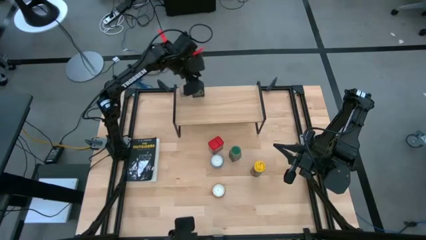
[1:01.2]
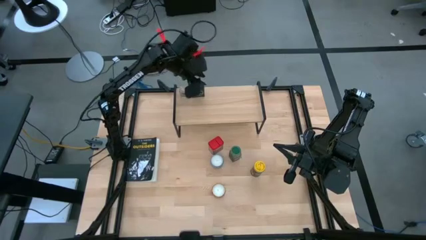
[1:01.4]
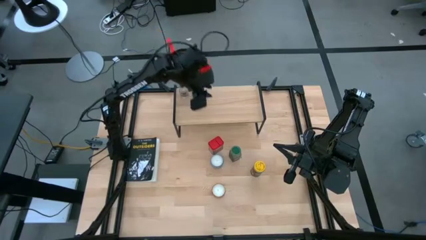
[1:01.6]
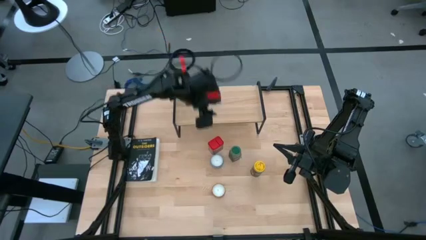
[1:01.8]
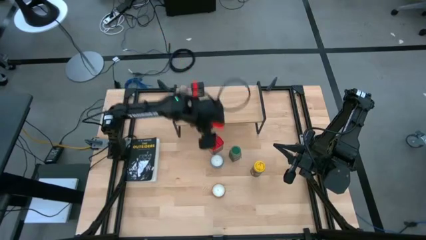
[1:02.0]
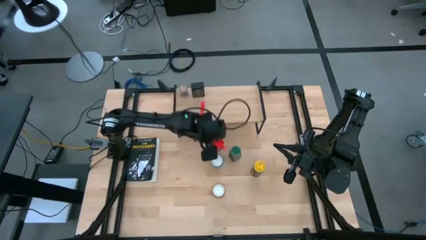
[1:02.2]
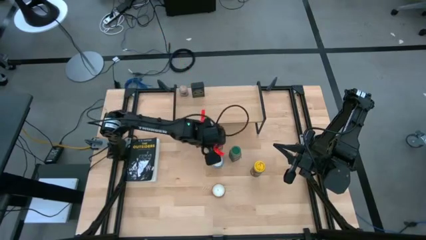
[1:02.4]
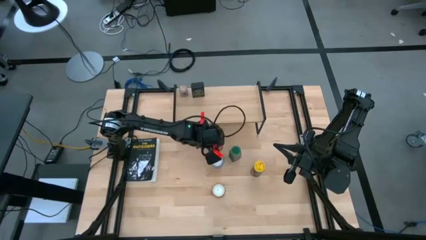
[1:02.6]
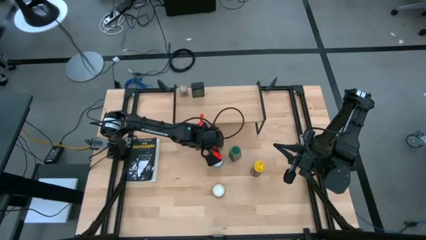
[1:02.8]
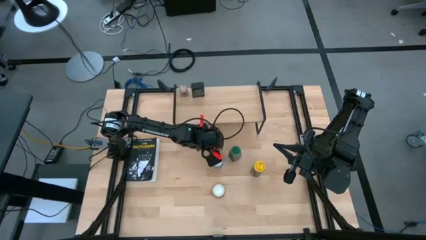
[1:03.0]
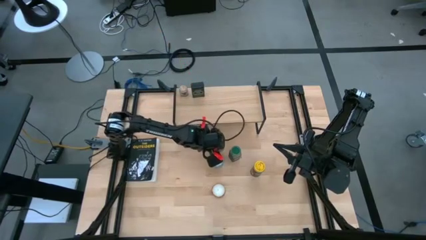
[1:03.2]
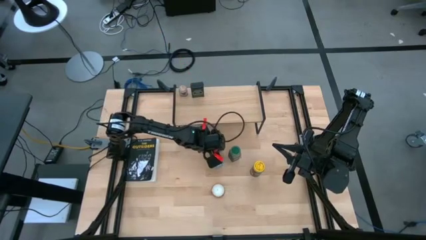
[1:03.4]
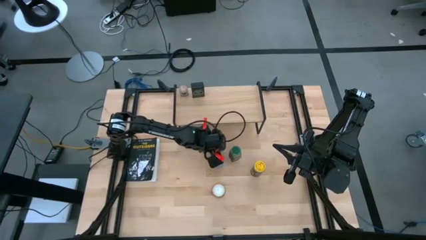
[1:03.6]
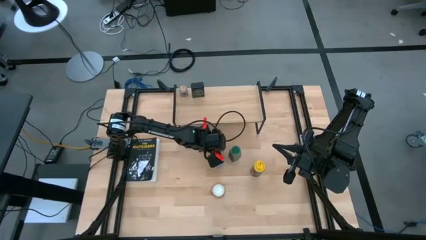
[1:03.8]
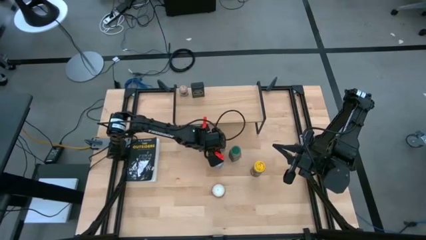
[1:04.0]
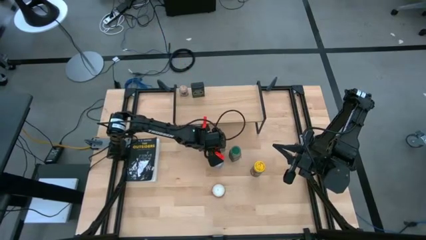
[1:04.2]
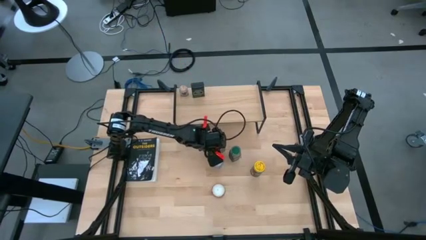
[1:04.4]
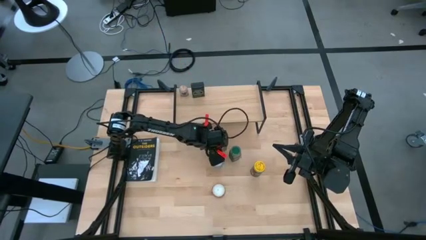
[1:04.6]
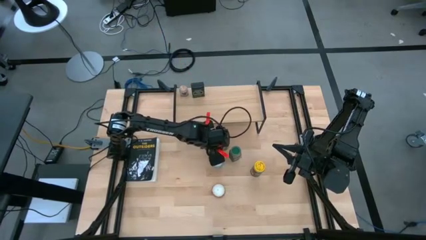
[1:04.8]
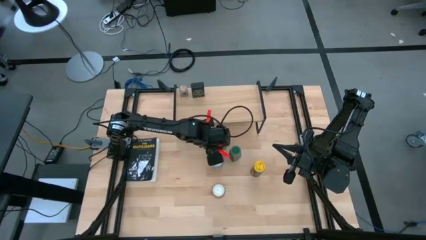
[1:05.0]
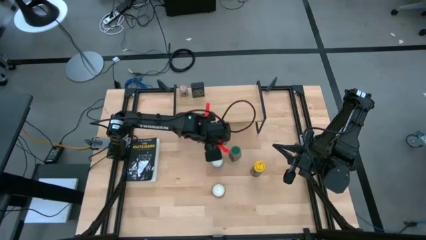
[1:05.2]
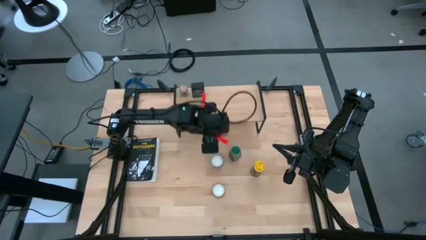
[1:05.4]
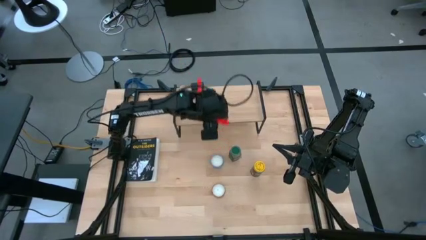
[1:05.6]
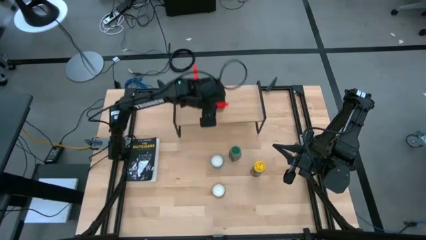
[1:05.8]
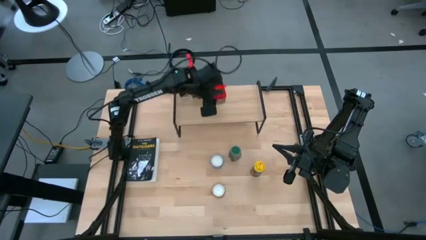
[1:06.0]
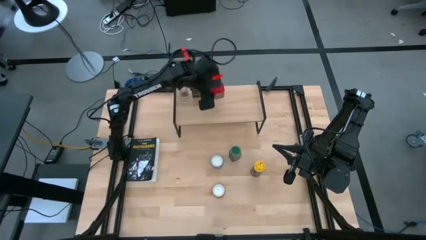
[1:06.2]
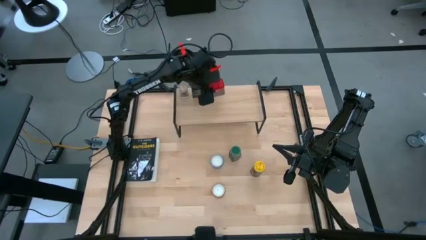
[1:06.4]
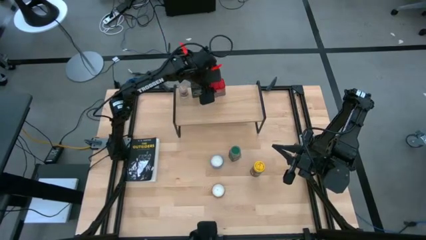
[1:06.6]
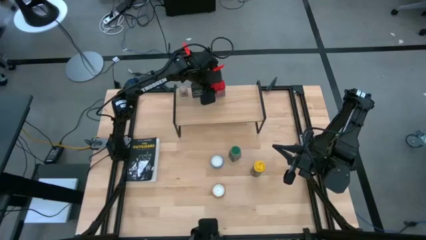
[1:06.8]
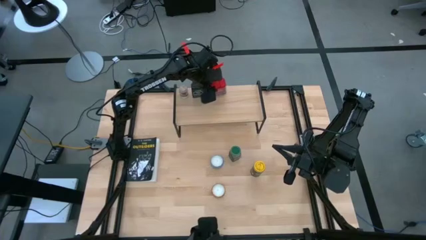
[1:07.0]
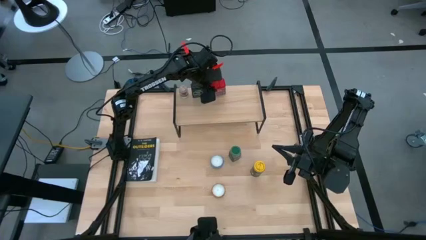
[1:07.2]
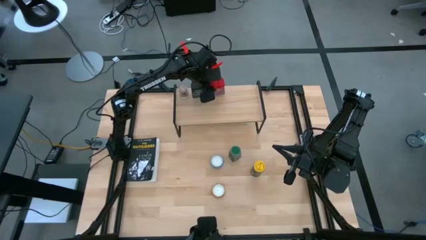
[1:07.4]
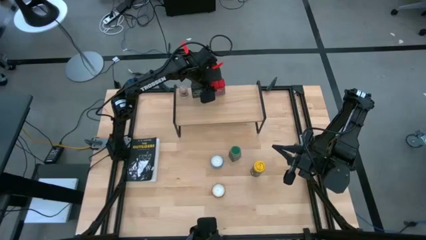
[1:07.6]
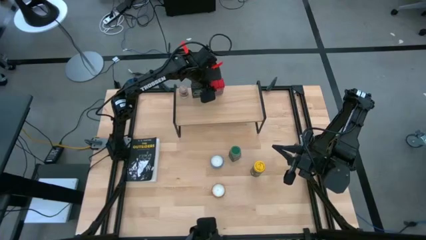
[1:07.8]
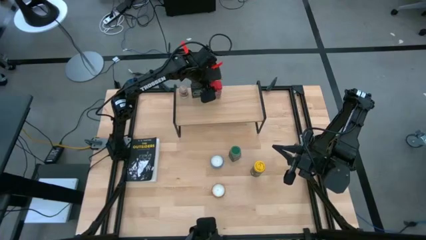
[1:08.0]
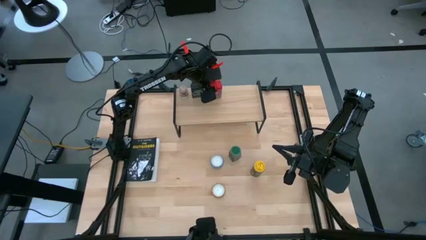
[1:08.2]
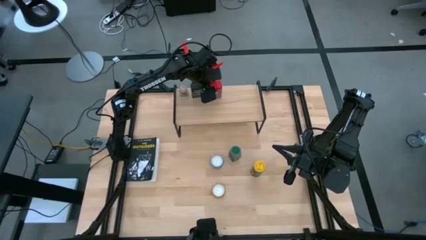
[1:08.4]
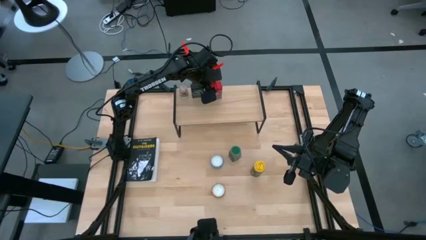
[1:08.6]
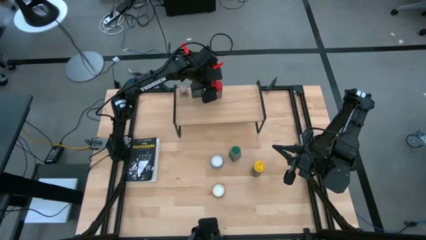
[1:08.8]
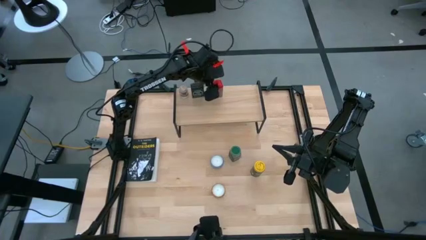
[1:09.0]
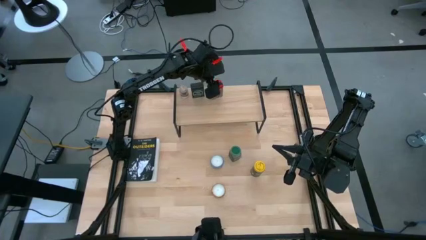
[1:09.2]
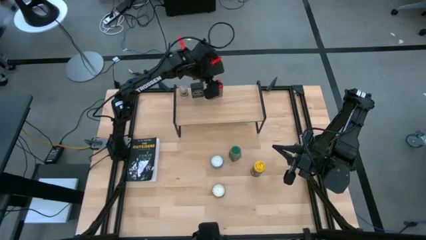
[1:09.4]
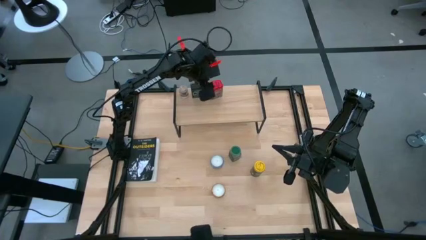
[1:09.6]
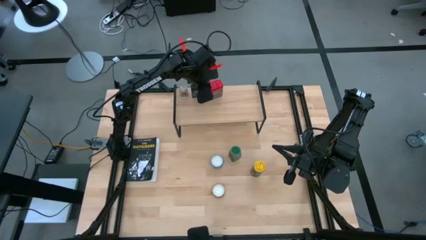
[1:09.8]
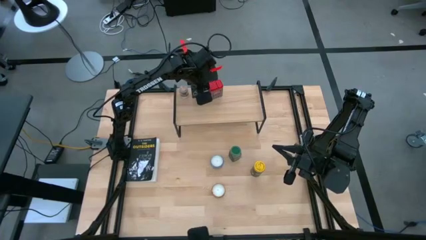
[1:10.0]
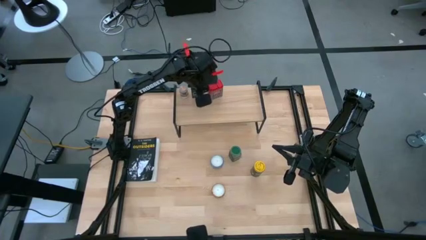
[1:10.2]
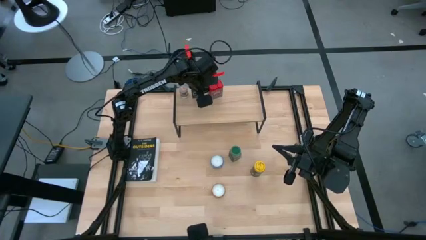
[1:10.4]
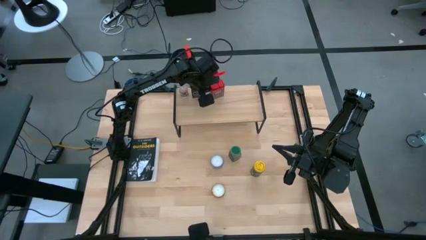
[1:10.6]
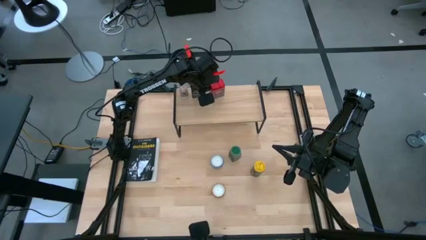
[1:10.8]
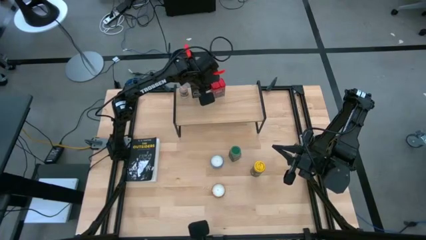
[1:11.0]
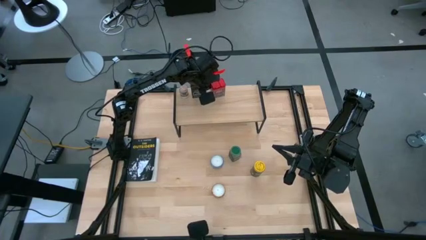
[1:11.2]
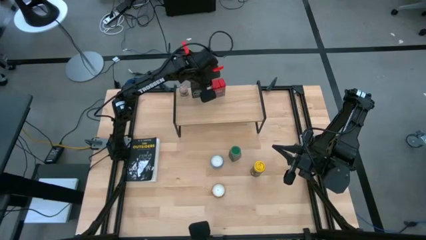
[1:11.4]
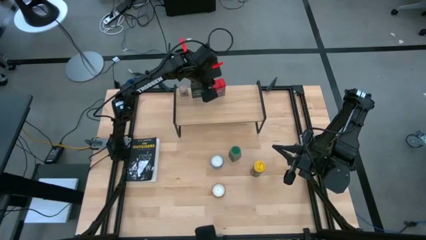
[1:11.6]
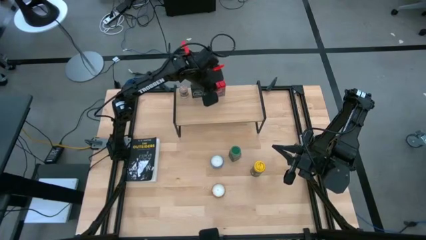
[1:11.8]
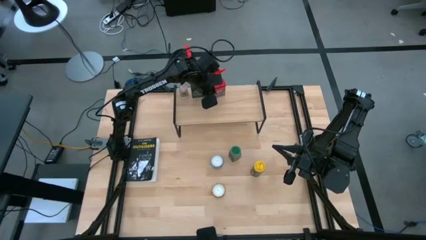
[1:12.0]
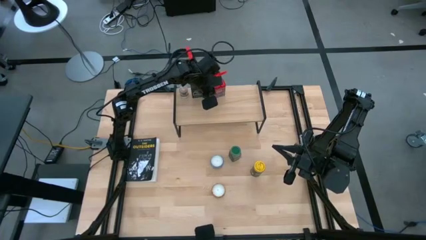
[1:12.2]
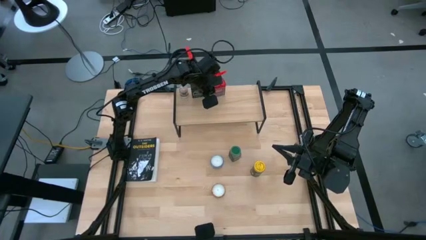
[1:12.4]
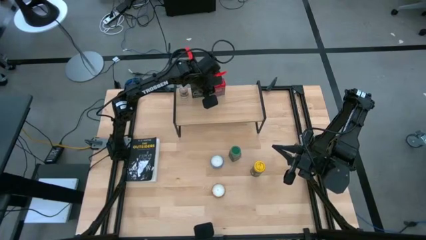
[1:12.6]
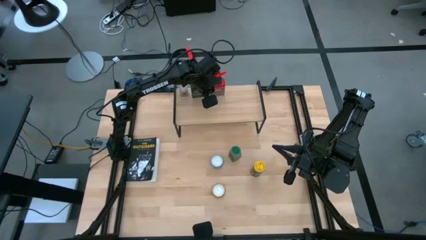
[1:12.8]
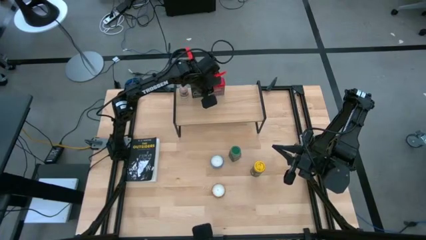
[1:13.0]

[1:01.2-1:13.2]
Task: Shelf spices
Put the red seasoning can on the shelf
